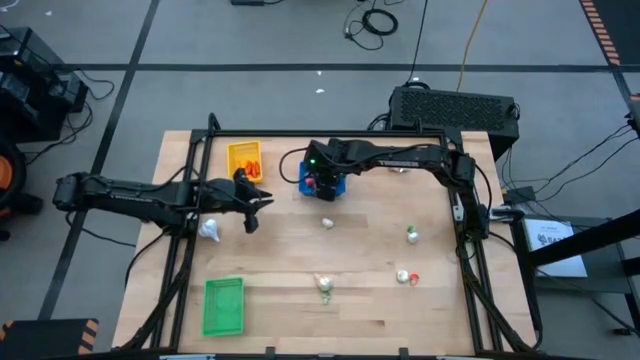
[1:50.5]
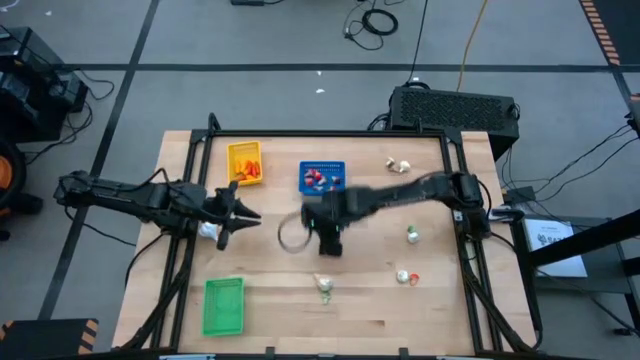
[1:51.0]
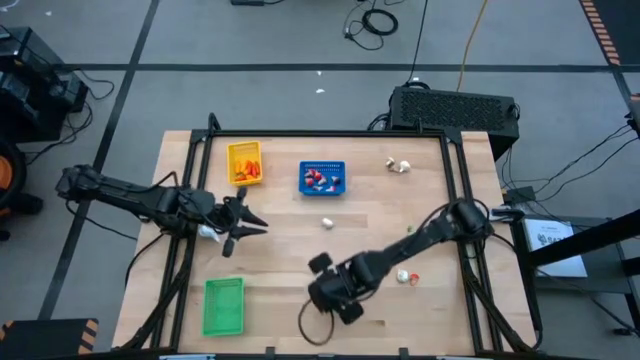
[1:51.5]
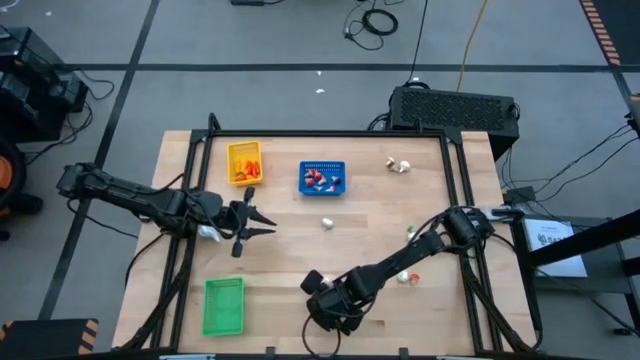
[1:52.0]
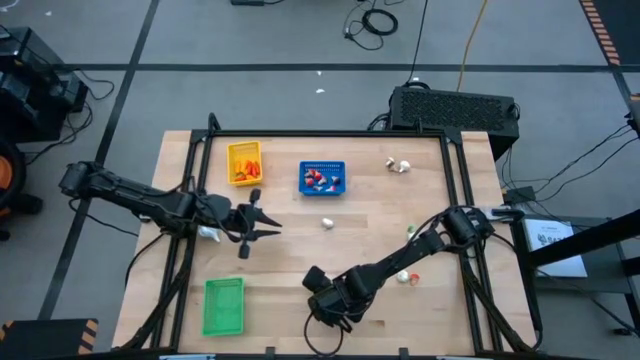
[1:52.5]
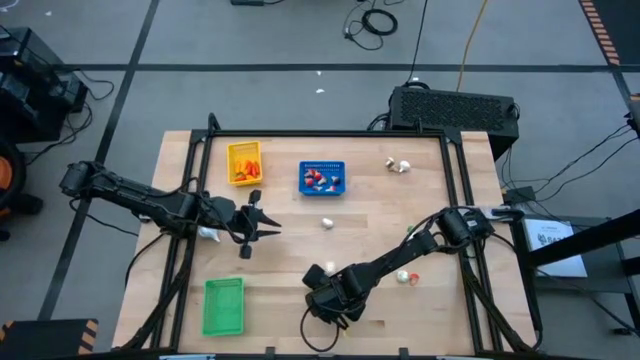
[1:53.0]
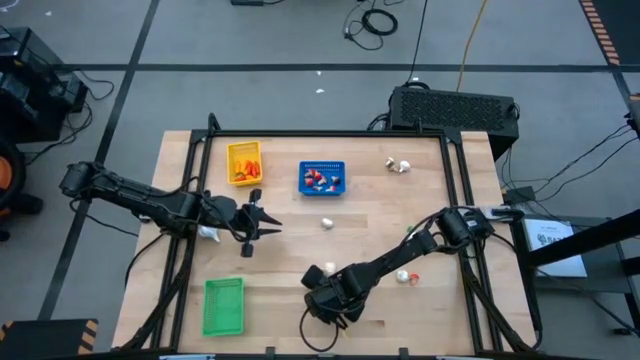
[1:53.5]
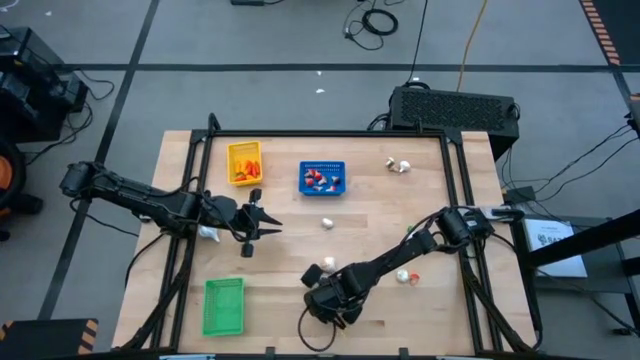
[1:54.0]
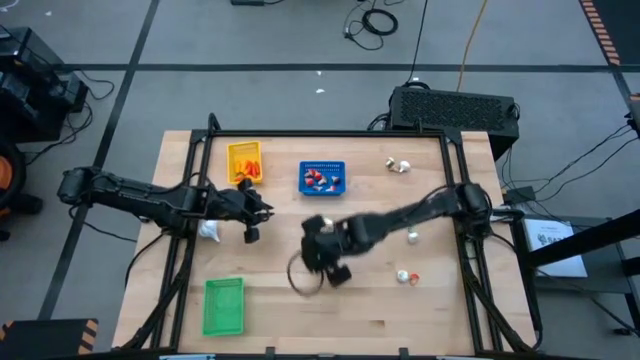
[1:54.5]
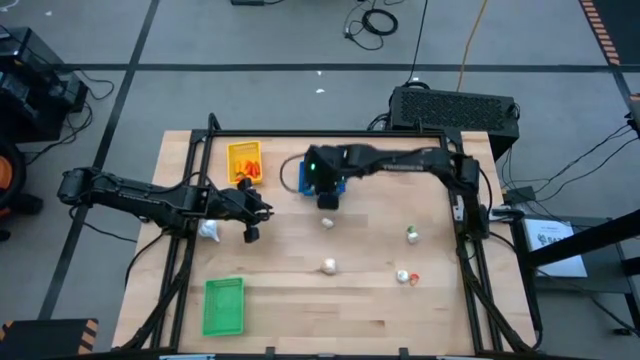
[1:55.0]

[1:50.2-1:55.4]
Task: Sort produce into baskets
Put the green mushroom into the blue bin

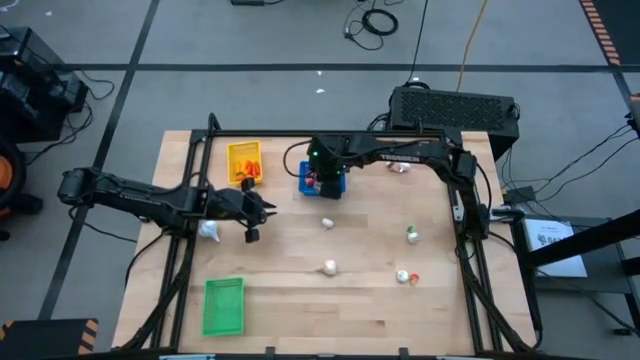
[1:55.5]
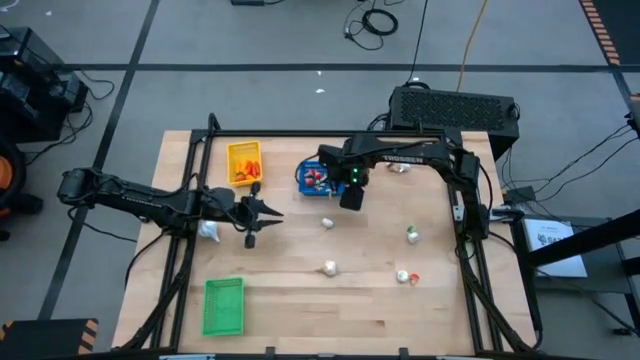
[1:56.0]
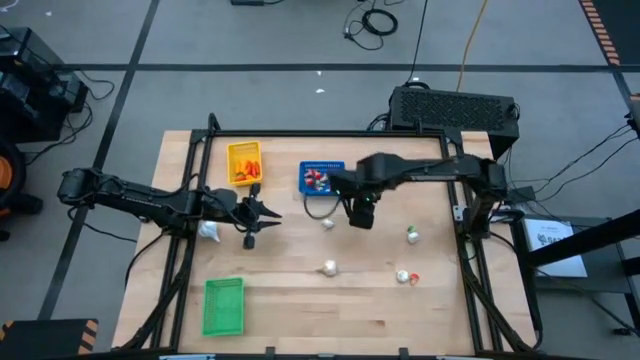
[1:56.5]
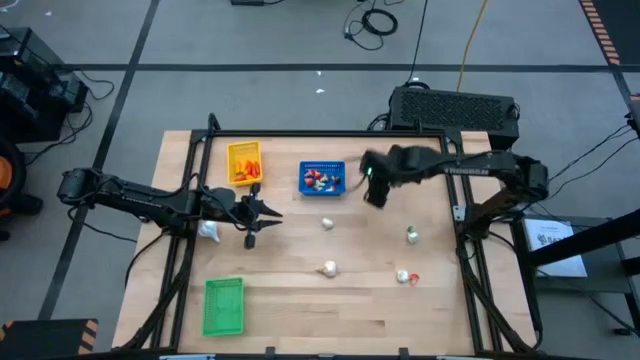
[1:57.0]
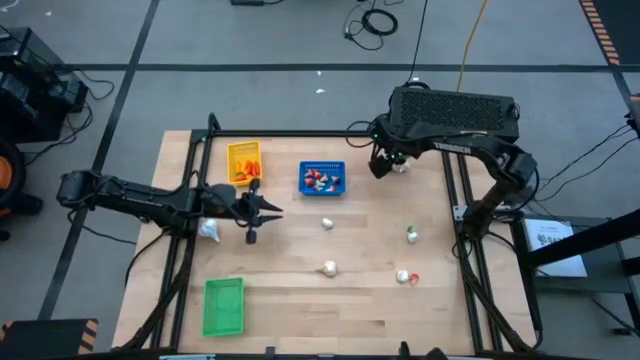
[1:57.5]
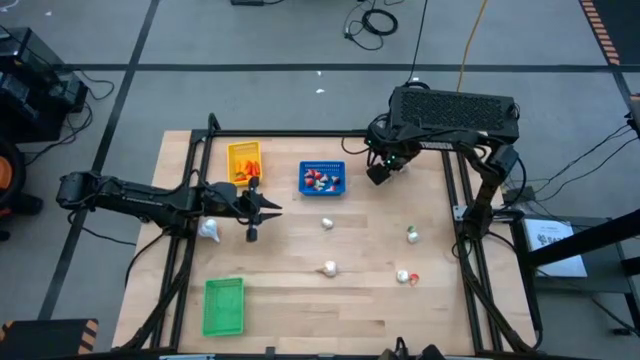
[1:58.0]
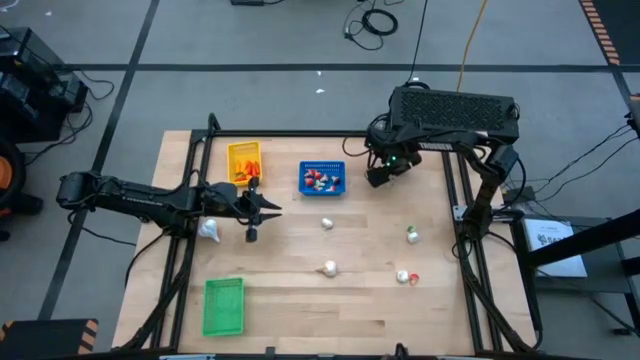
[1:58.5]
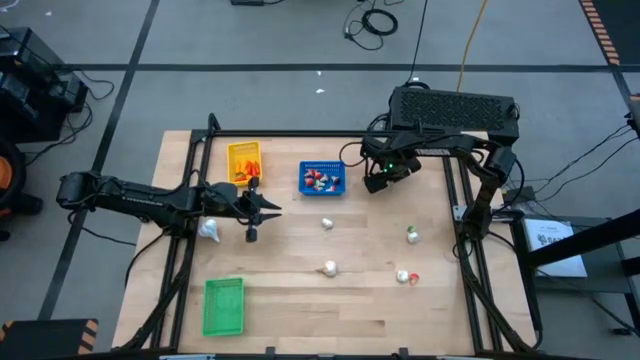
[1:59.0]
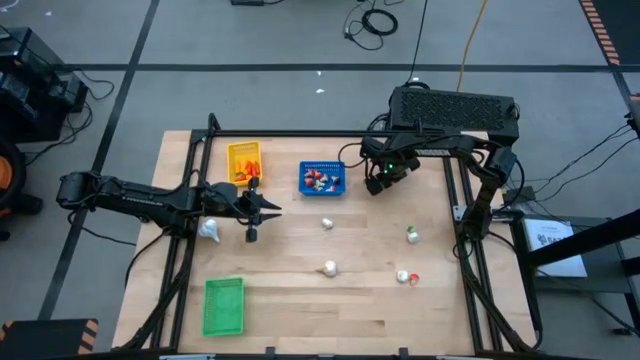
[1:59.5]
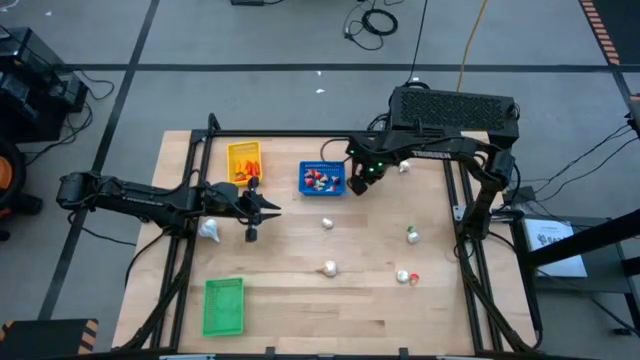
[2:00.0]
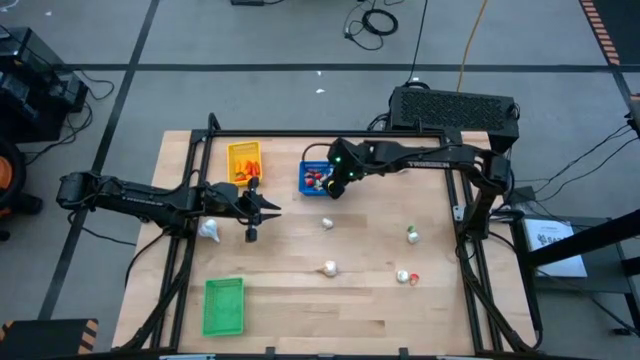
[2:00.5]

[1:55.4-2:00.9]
Put the brown mushroom into the blue bin

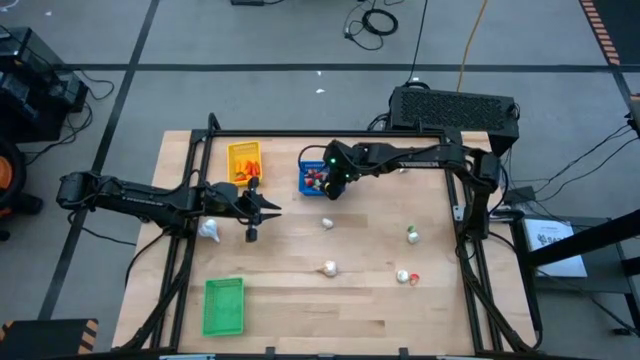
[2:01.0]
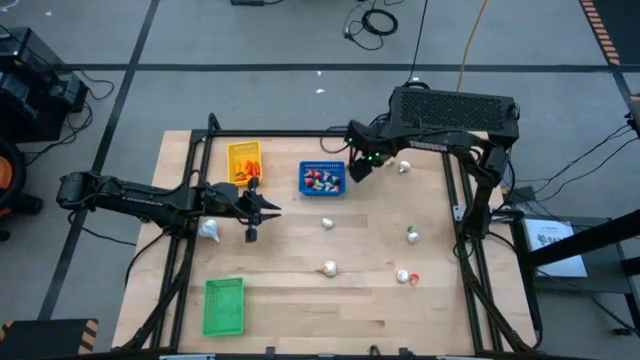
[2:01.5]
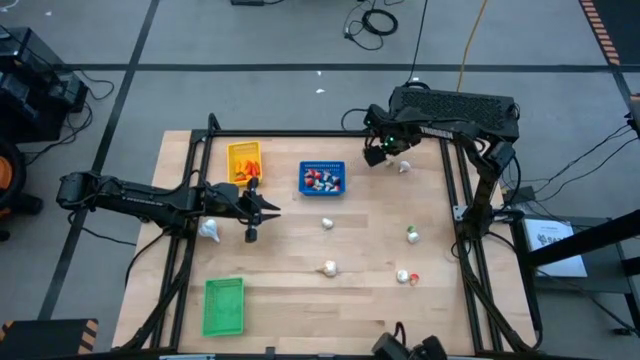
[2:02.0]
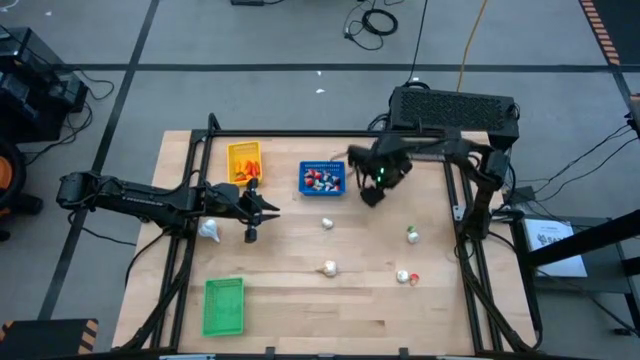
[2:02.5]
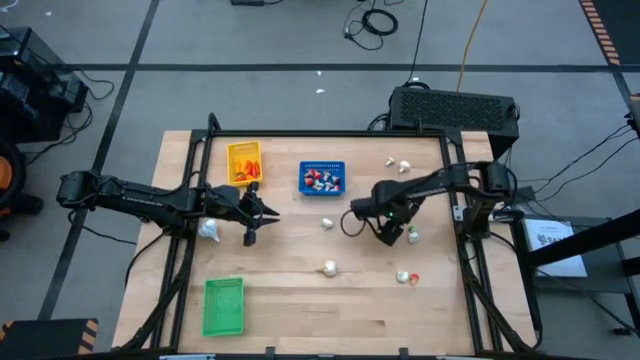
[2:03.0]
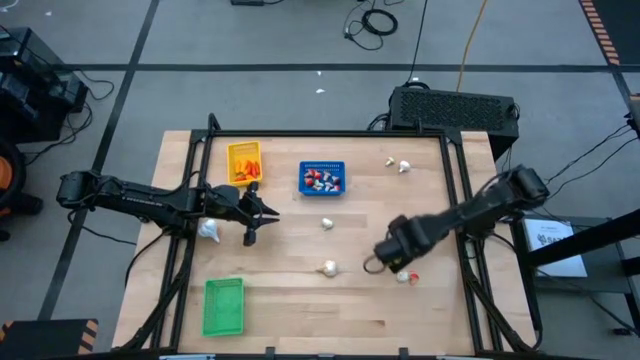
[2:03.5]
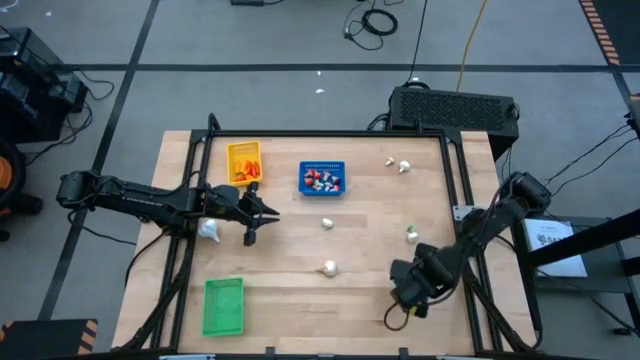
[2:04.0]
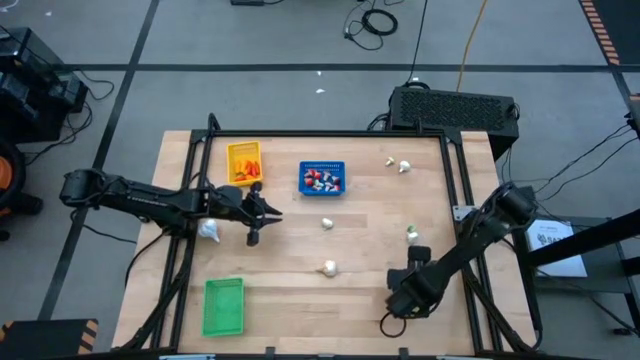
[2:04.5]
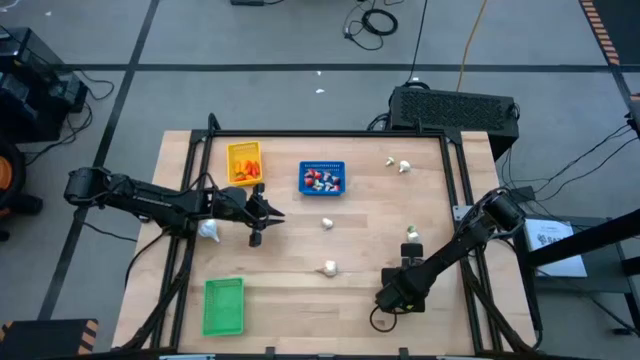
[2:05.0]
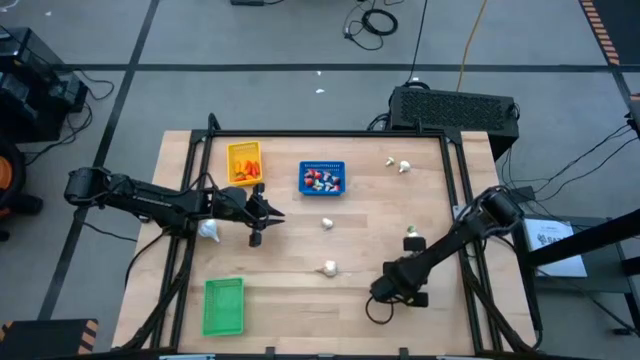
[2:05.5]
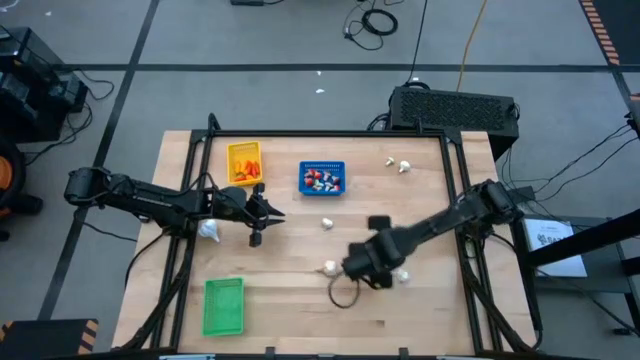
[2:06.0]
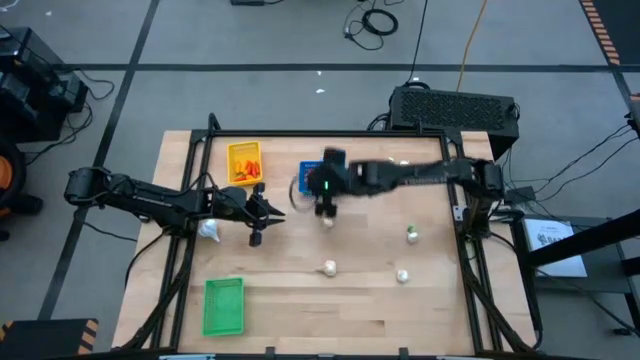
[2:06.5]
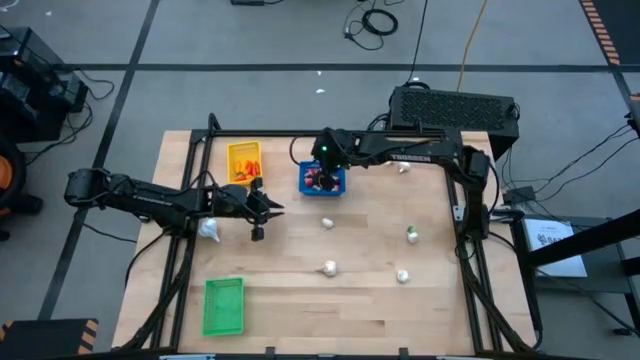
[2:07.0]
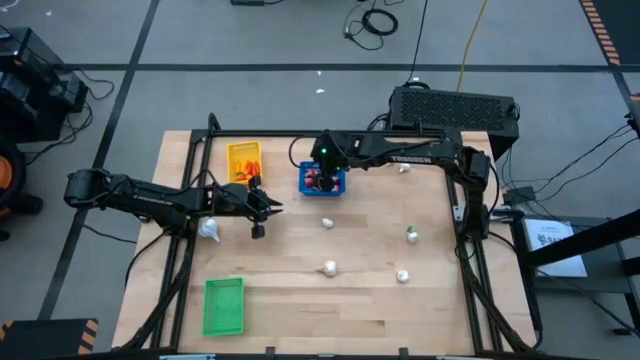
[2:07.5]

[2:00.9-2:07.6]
Put the orange mushroom into the blue bin

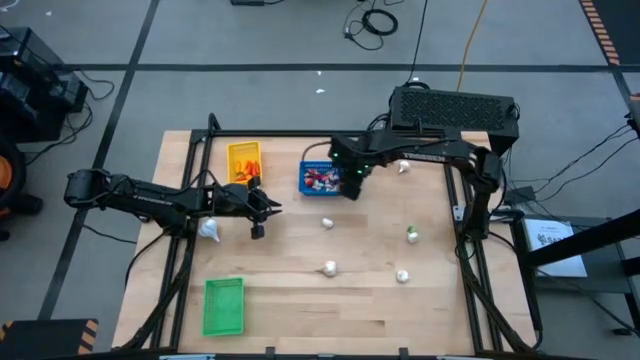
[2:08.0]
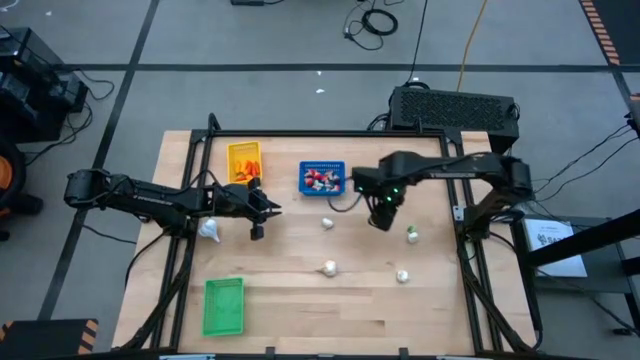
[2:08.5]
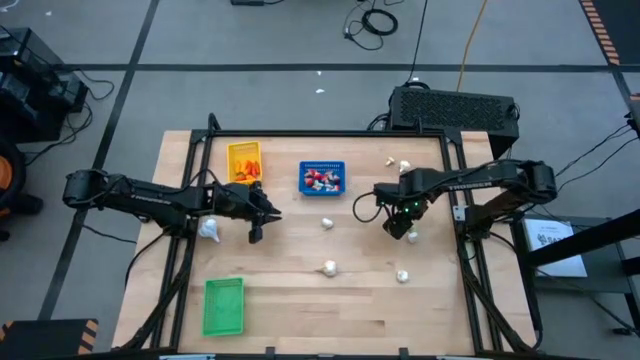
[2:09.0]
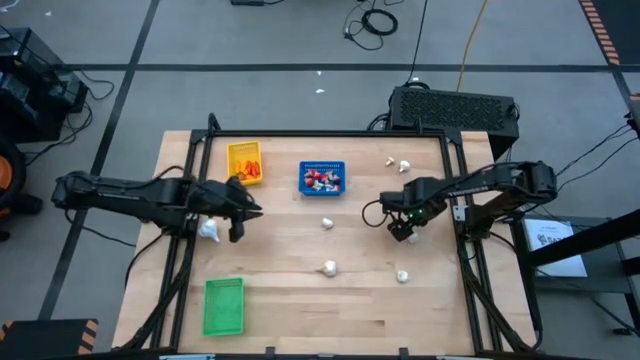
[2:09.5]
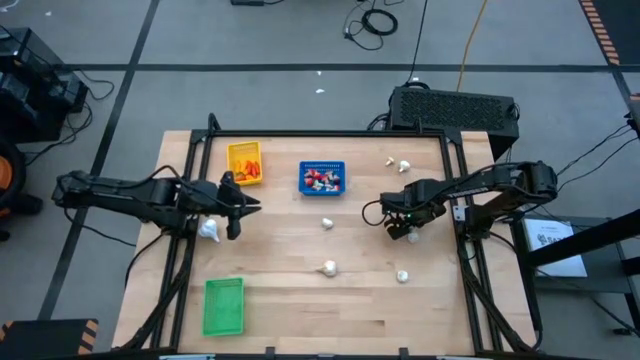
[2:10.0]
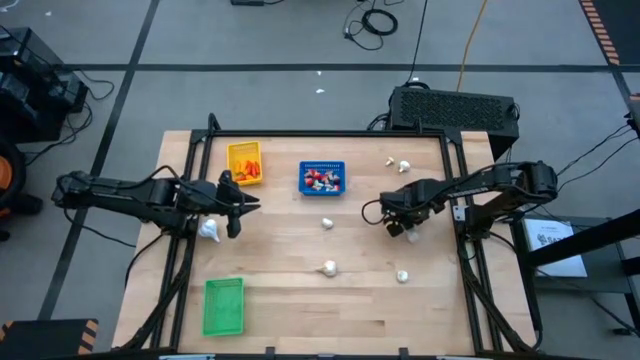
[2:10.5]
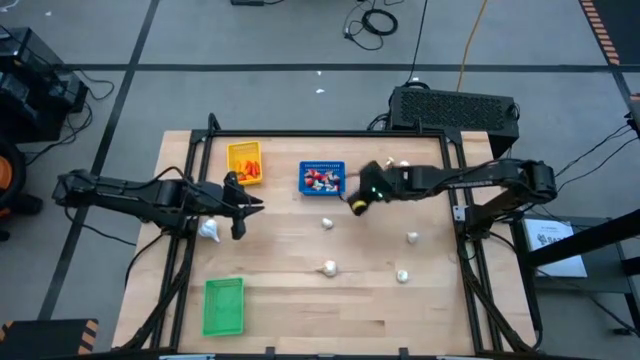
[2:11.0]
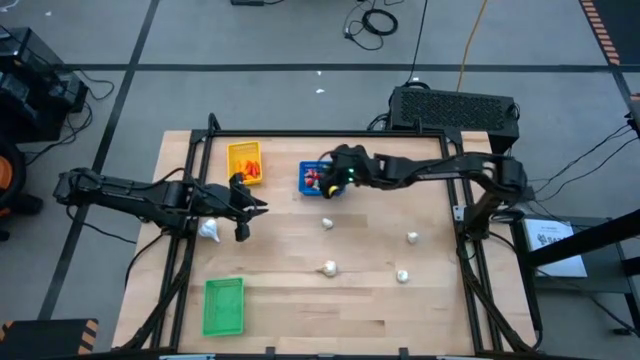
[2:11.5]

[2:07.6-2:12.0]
Put the green mushroom into the blue bin
